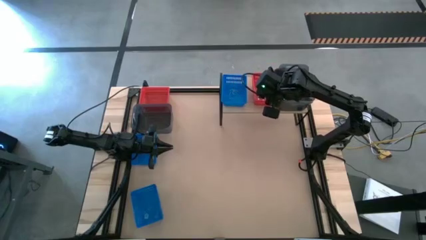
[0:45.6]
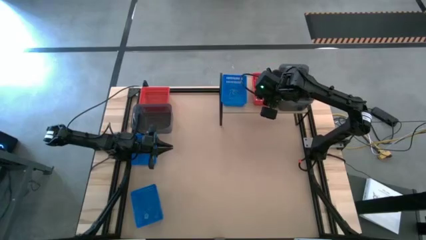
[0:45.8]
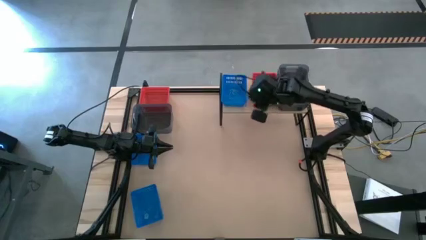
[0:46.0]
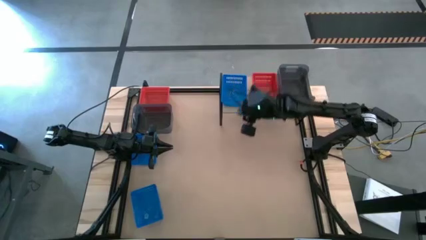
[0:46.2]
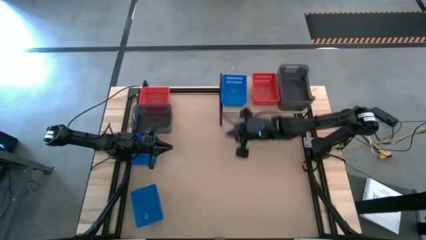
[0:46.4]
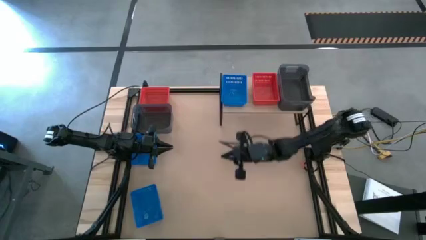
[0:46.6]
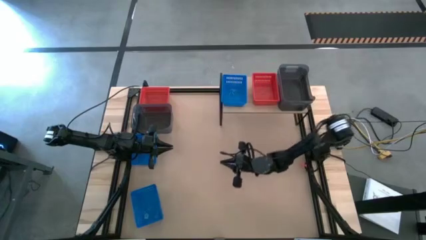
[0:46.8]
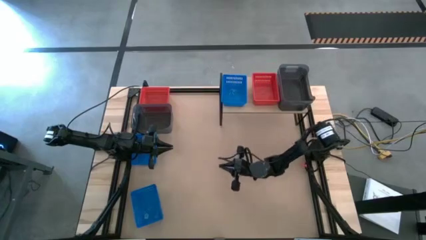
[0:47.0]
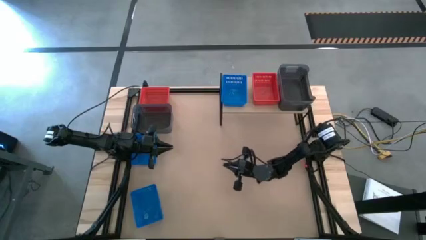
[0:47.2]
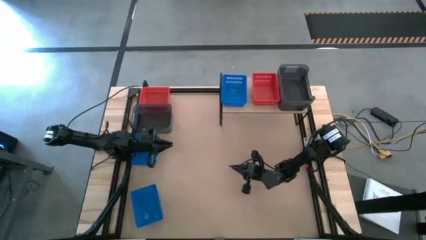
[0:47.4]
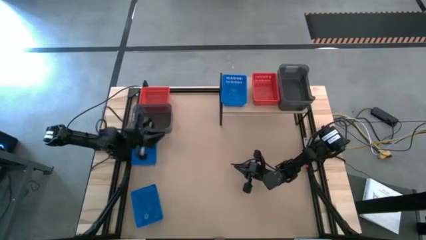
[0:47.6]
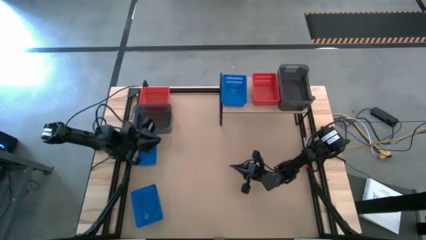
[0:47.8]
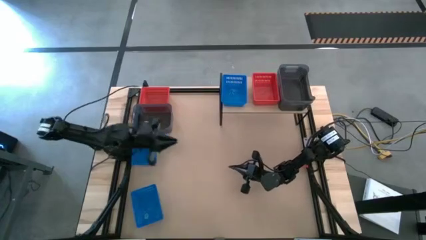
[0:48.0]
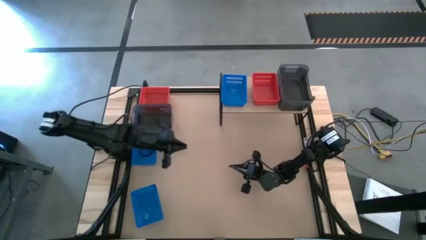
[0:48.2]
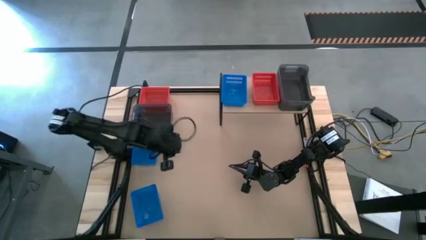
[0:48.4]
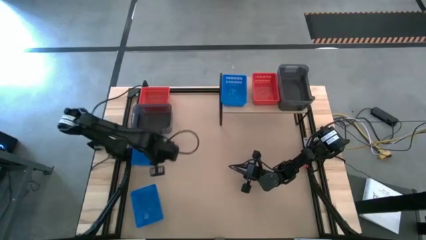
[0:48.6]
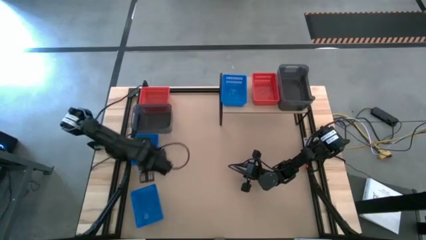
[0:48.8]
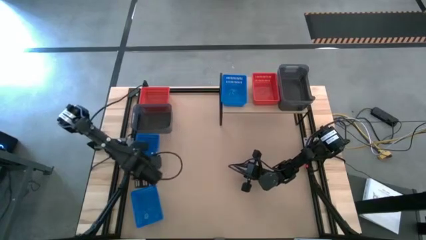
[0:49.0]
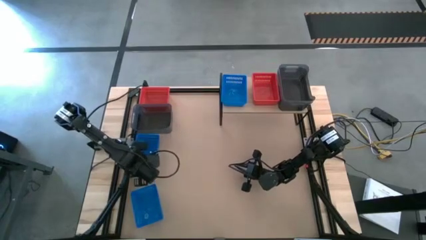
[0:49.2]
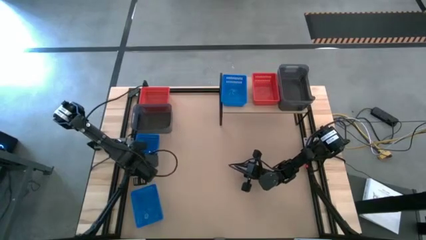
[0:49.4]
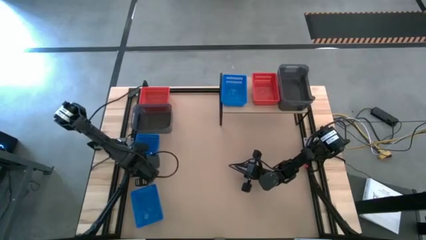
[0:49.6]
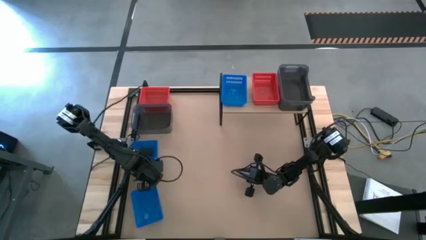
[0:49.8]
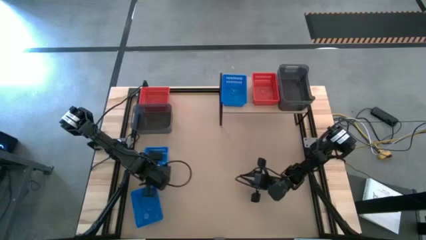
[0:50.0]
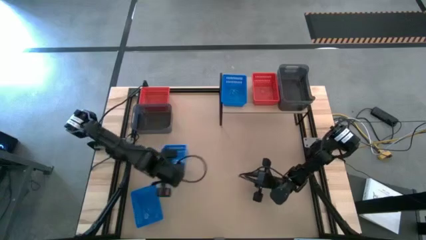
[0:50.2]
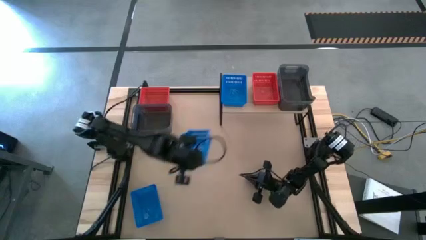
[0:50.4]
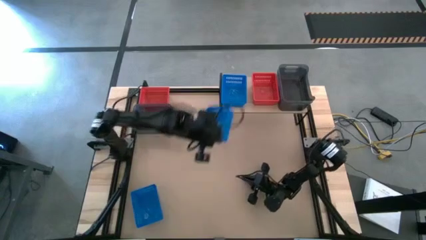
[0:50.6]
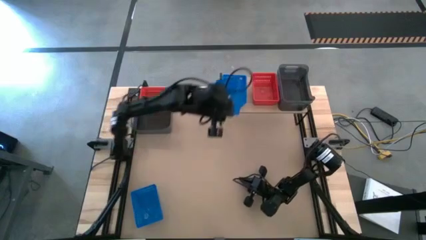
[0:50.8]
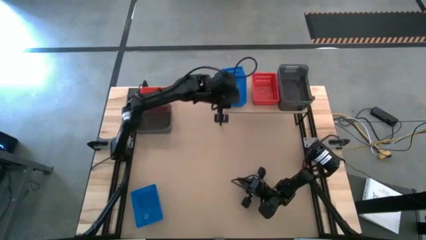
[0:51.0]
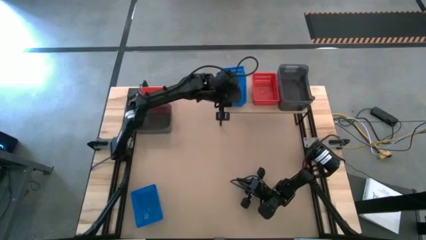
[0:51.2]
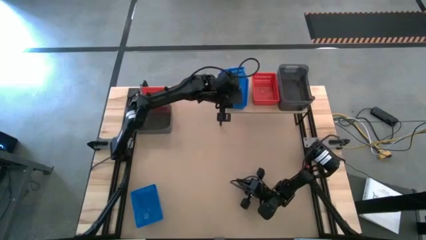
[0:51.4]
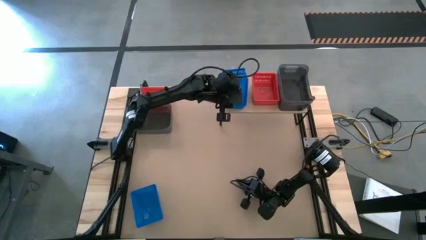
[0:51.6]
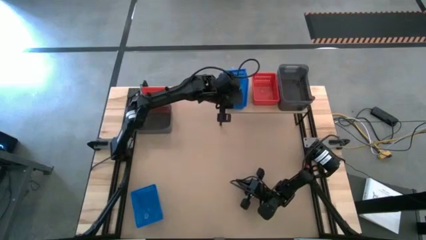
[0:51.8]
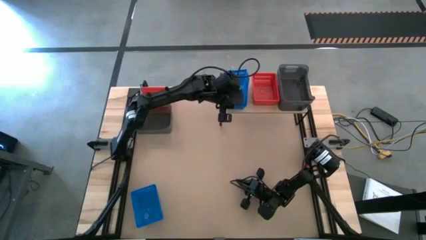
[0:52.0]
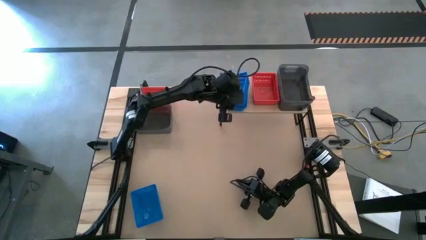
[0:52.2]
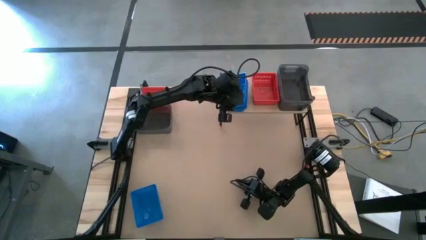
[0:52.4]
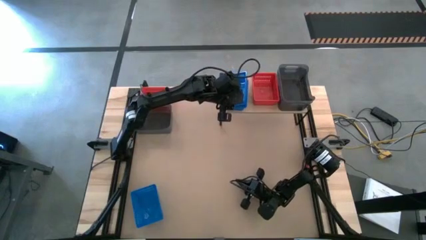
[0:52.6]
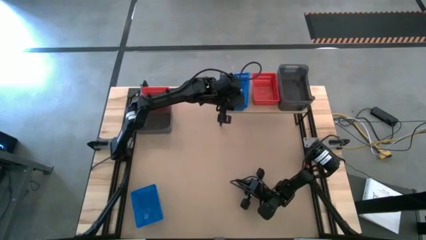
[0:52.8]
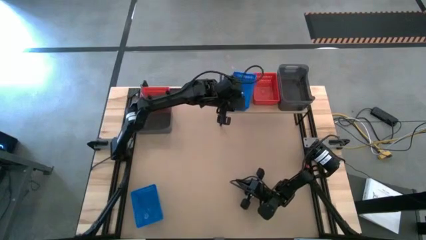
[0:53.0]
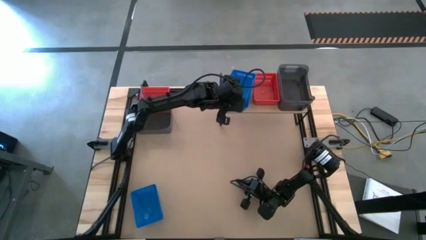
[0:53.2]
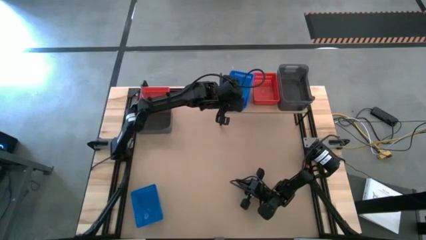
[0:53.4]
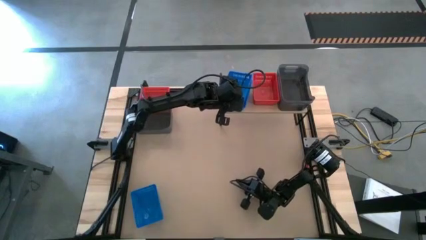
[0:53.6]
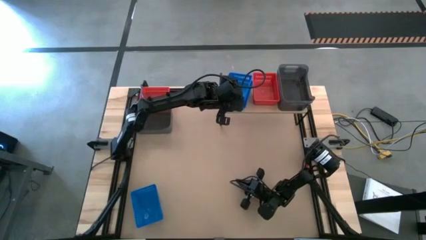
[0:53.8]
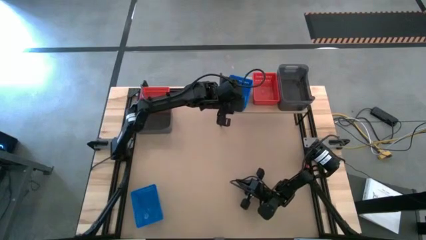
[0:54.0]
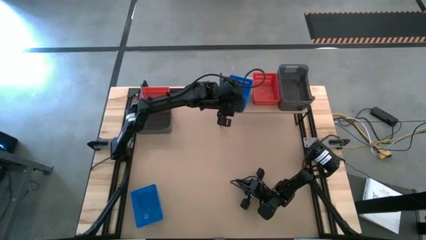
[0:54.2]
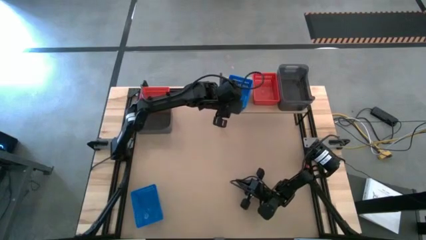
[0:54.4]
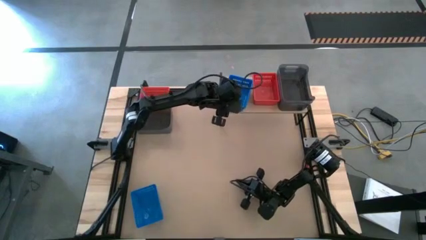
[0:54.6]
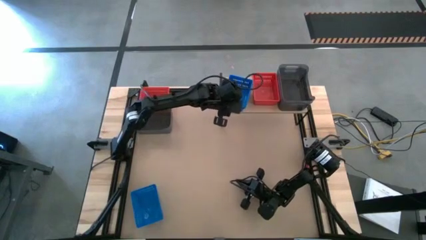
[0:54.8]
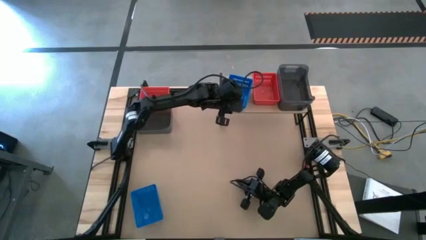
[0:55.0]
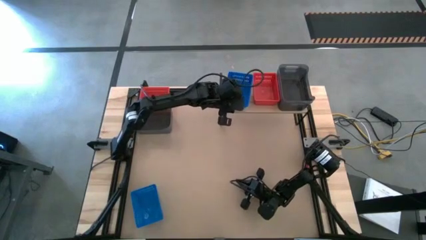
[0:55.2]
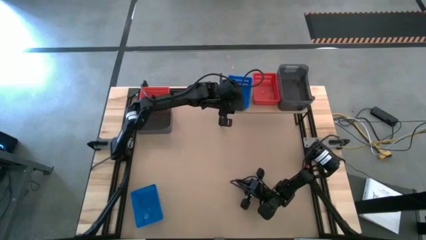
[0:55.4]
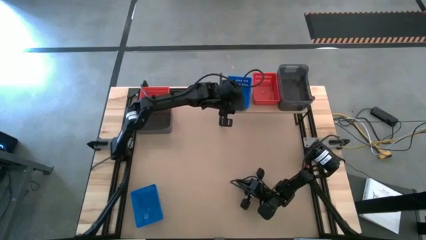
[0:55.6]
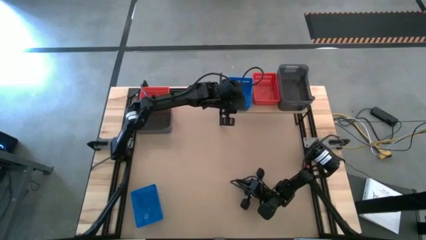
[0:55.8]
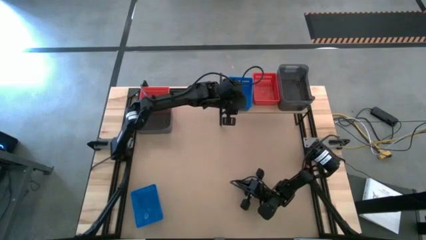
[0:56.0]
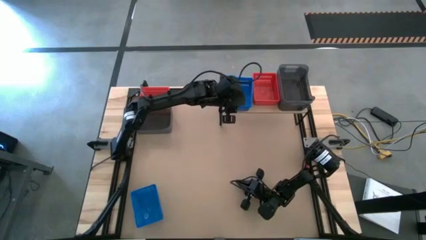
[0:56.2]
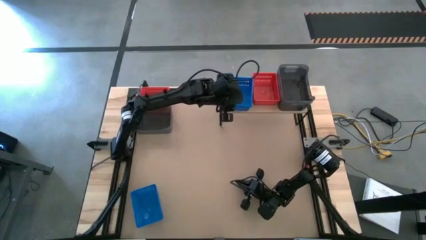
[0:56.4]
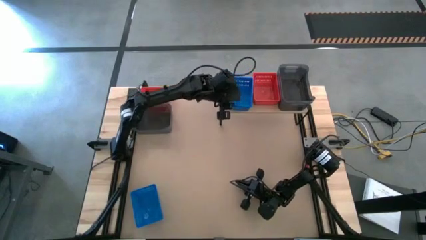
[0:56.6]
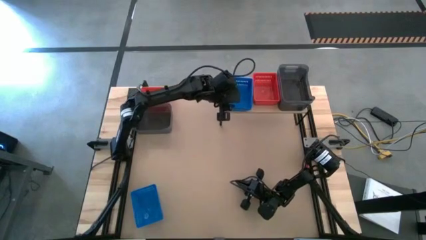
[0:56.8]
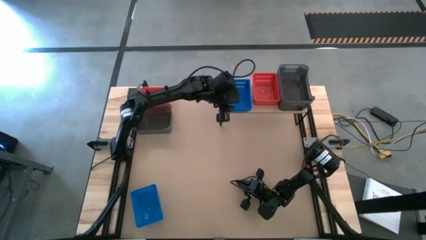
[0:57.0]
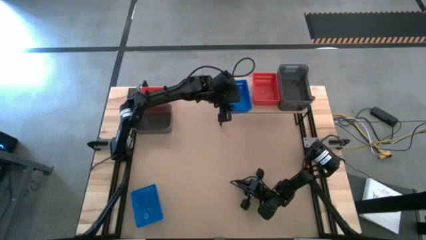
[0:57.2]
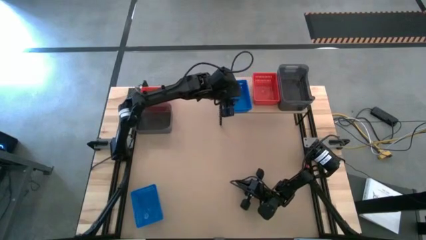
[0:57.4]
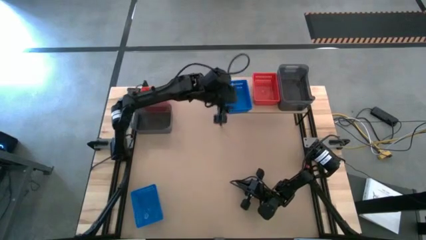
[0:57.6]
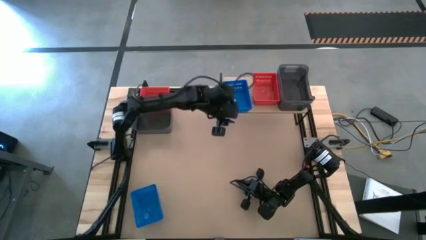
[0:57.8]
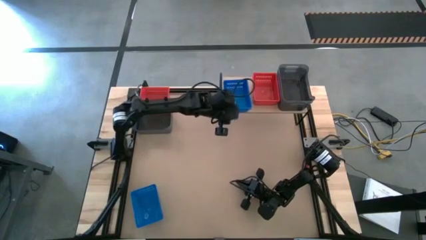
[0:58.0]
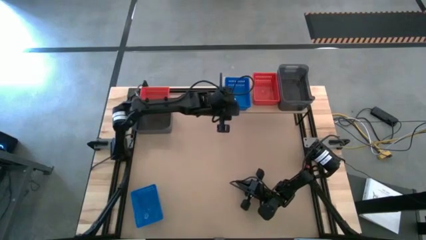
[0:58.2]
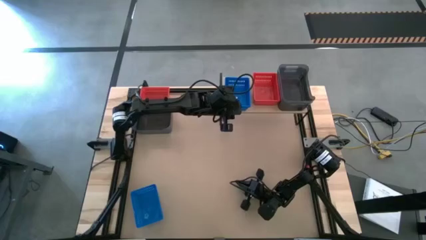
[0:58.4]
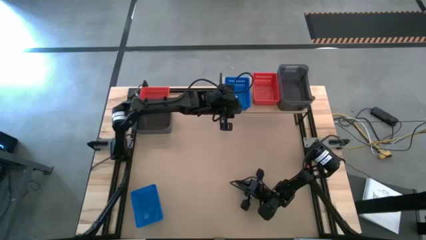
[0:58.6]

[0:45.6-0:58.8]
Task: Stack baskets on shelf by color
Stack the top blue bin on the other blue bin on the shelf
